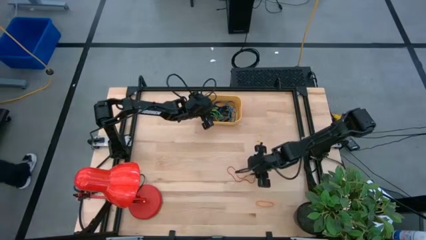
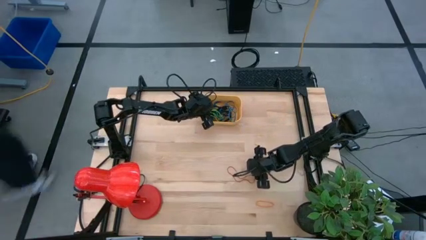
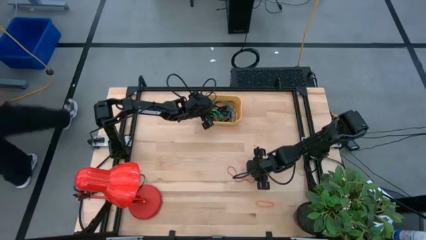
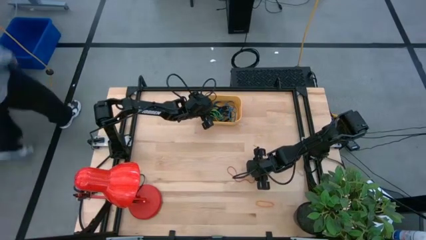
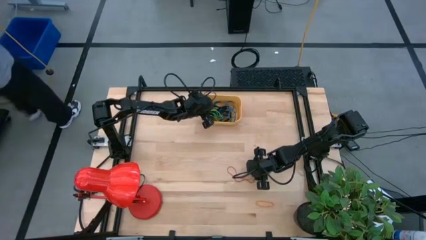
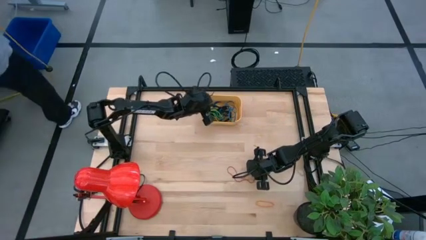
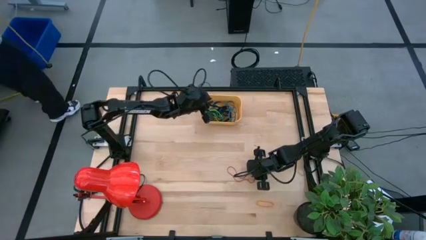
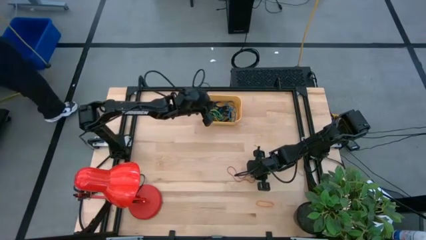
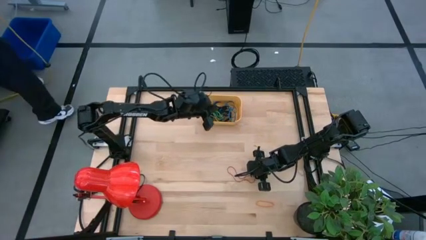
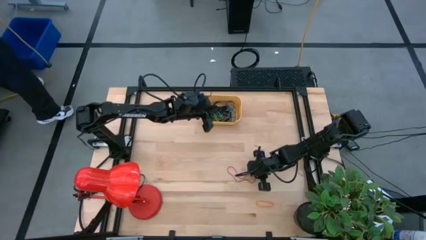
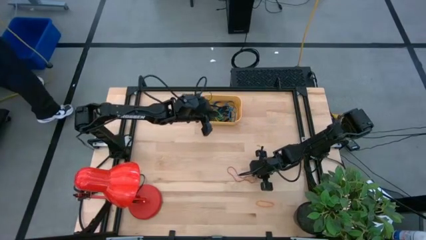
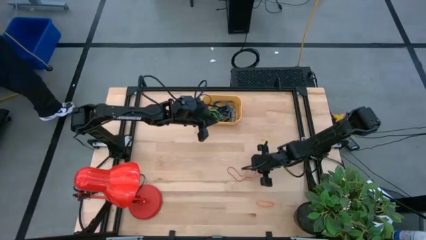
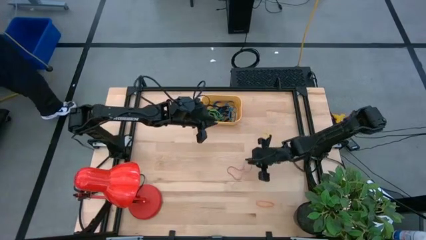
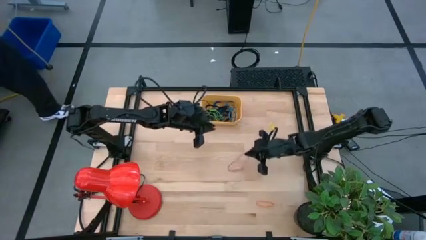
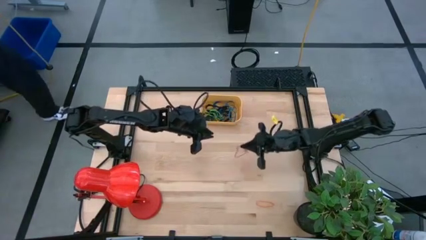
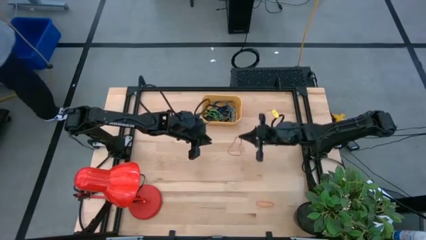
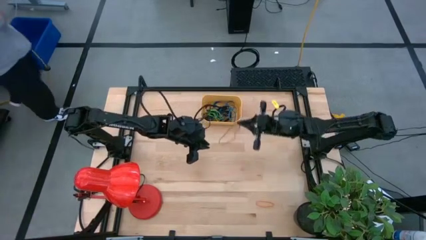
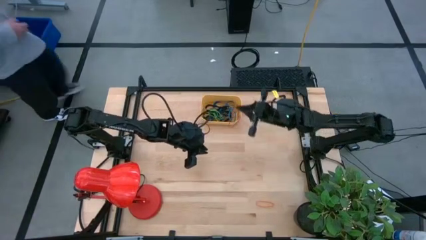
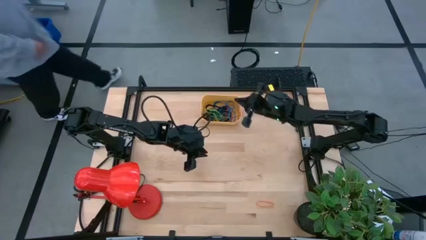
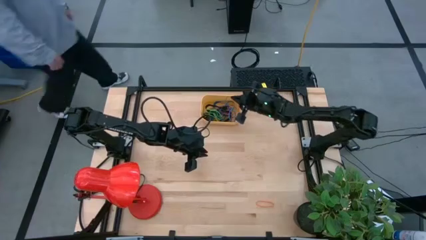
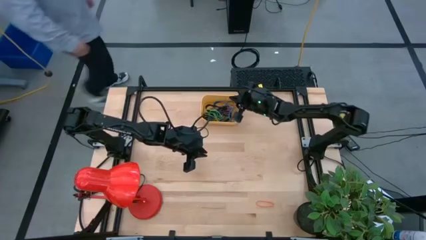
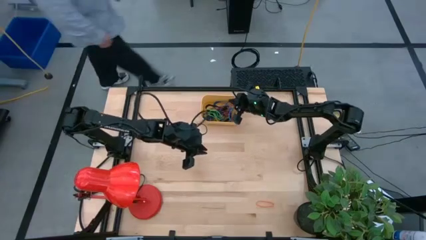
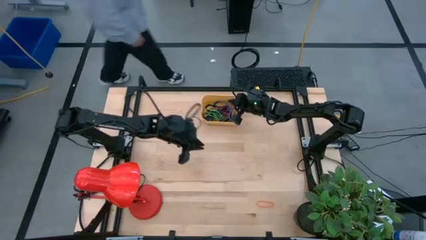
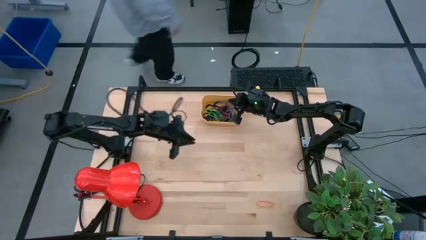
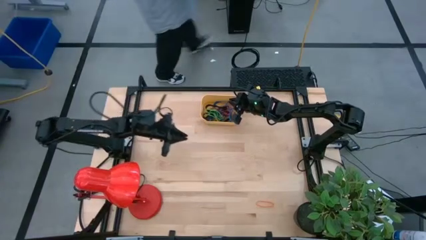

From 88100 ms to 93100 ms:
Task: Pick and place rubber bands into bin
Put the red rubber band into the yellow bin

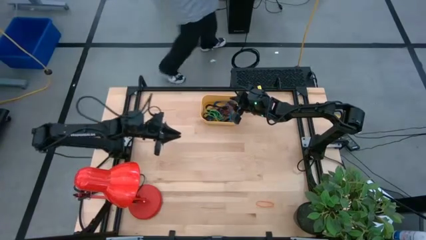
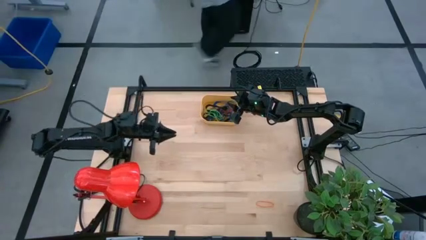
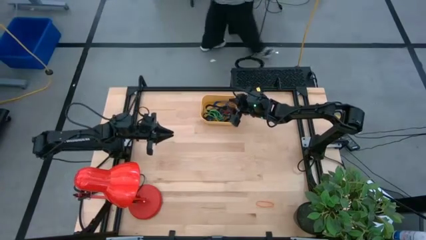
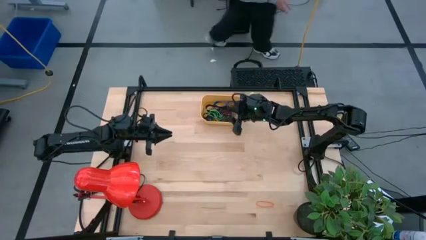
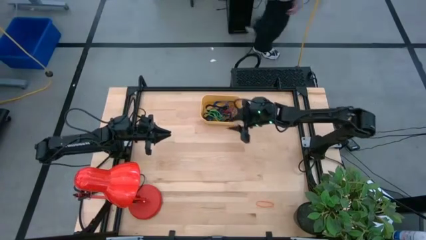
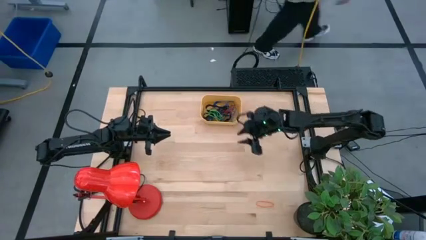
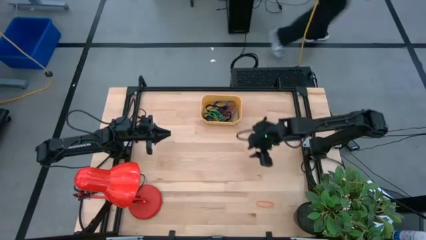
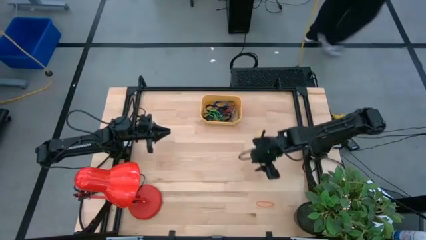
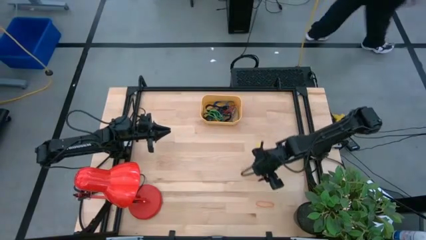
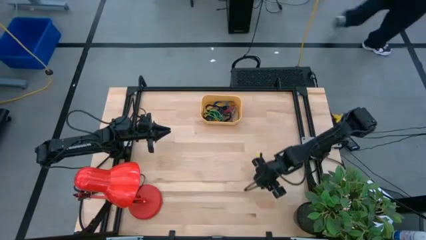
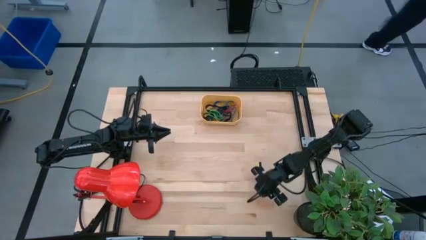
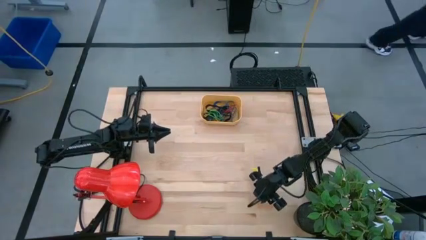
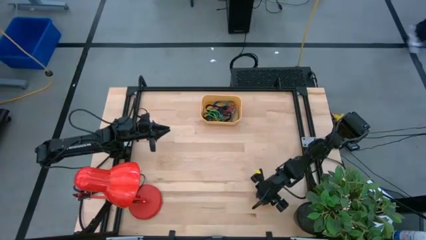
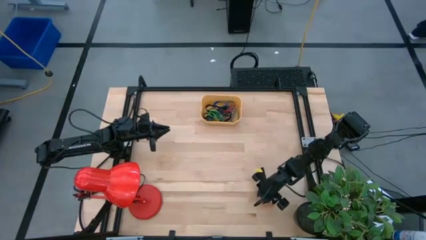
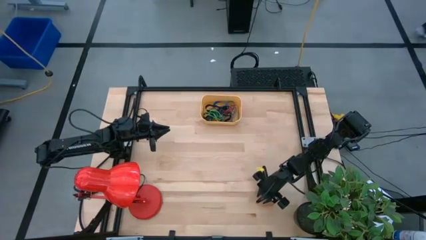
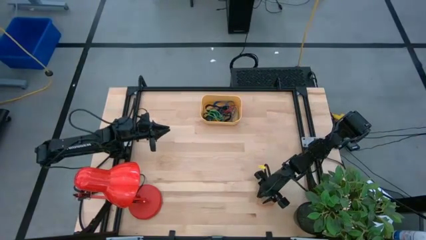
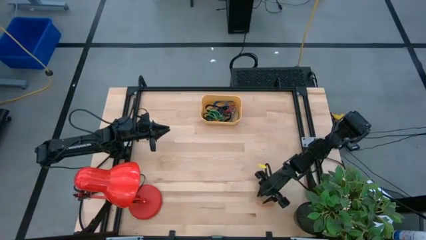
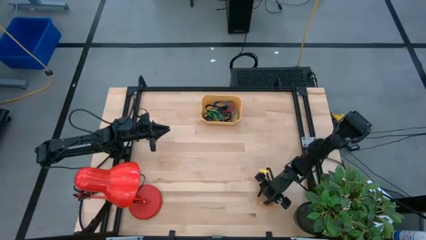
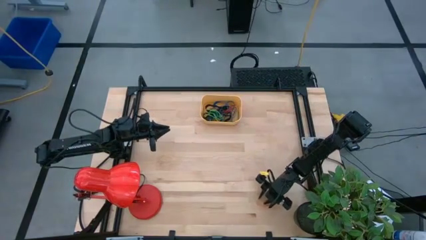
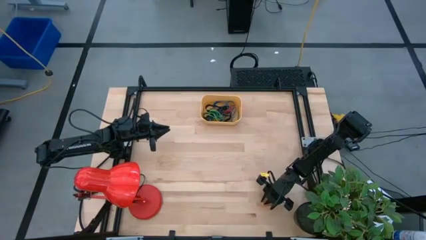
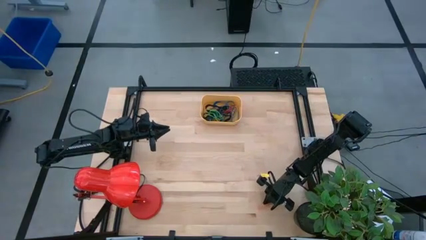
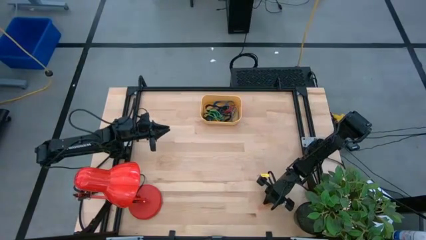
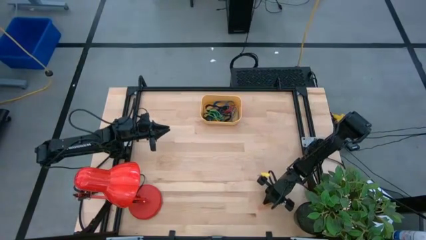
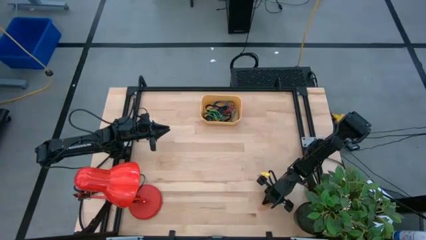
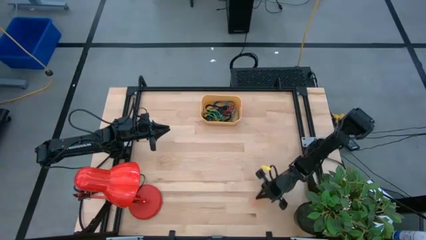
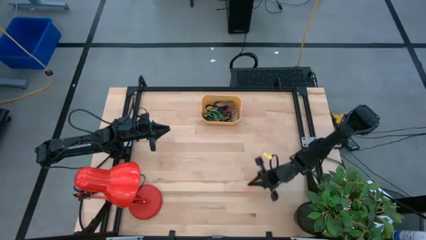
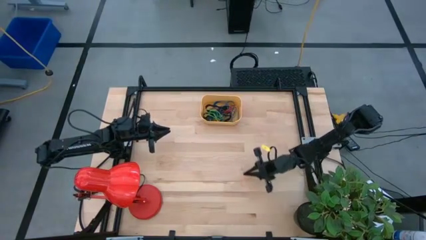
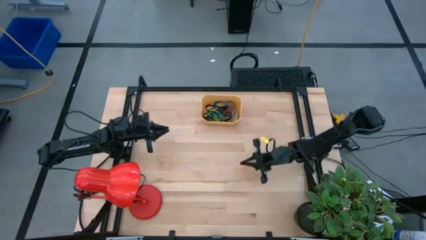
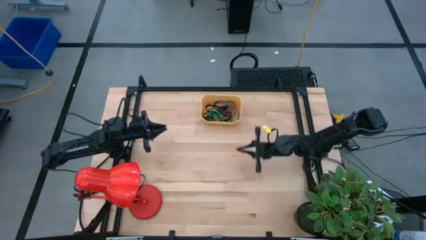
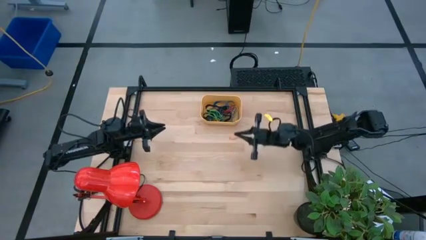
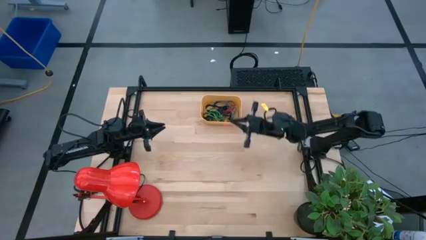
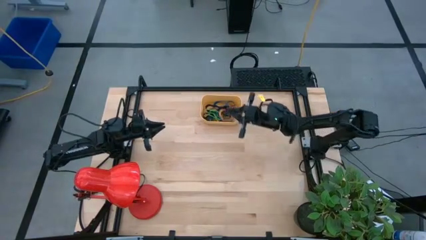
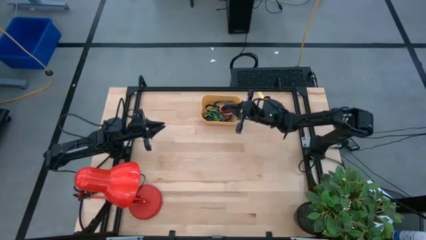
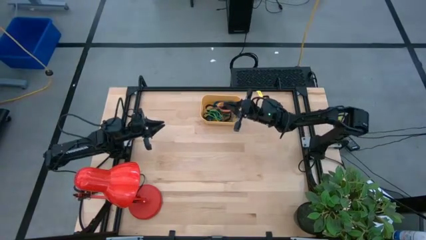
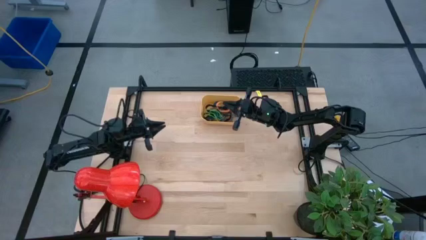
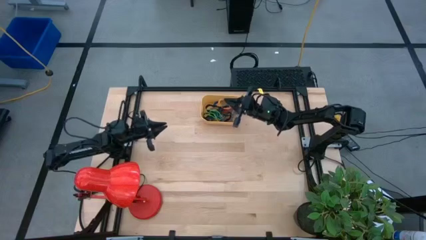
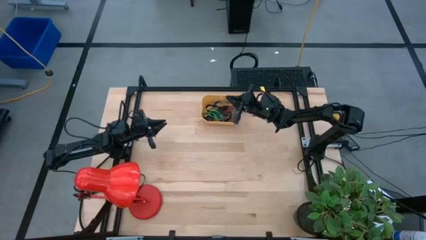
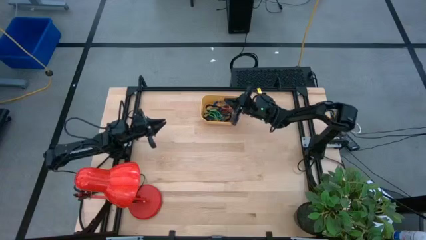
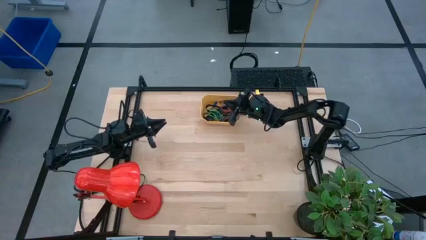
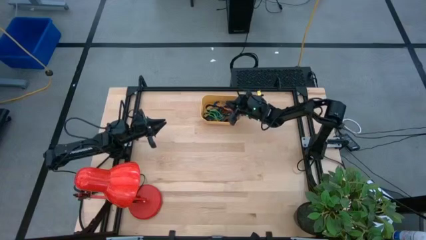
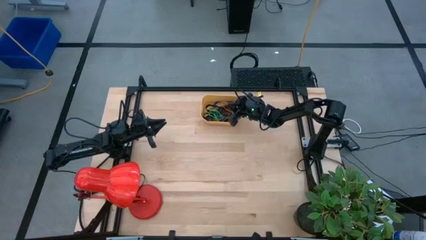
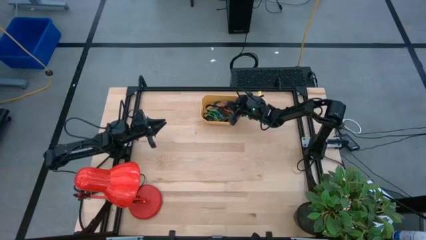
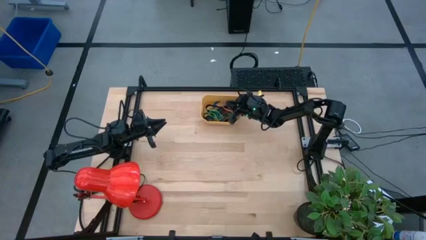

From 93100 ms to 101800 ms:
Put the orange rubber band into the yellow bin

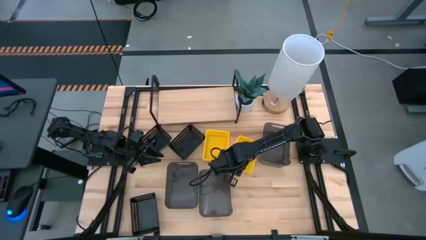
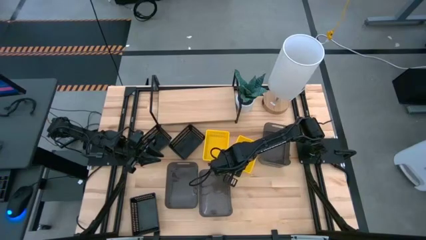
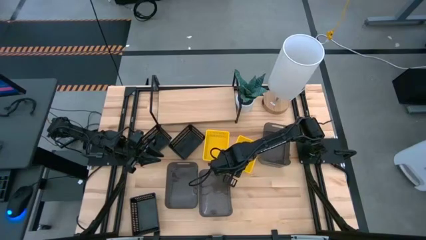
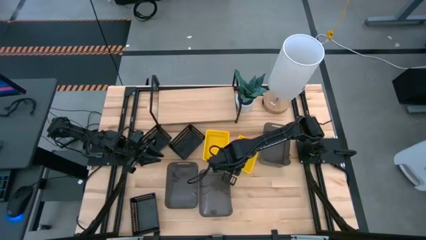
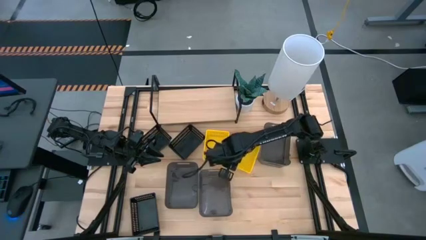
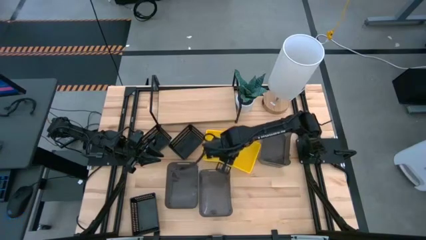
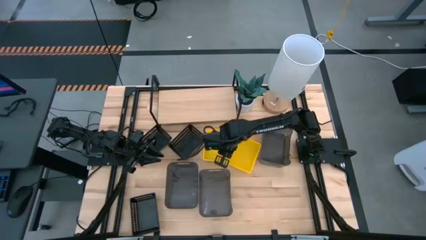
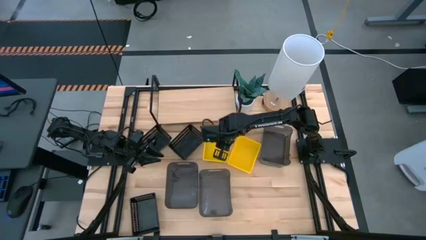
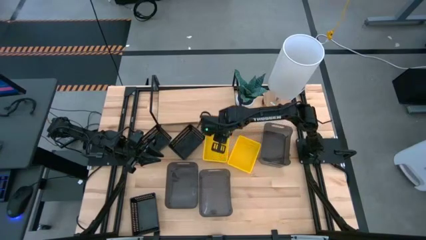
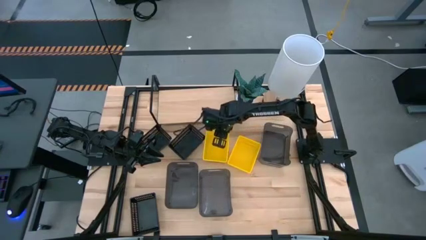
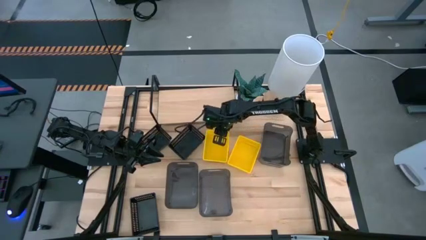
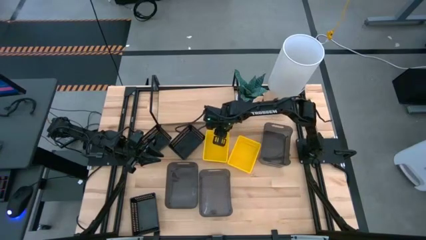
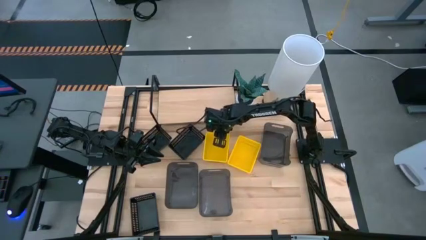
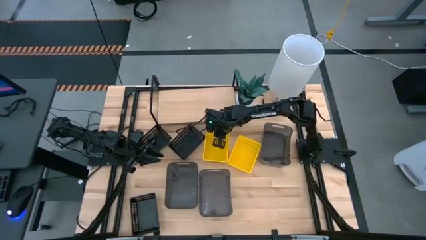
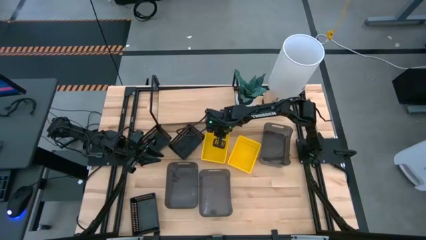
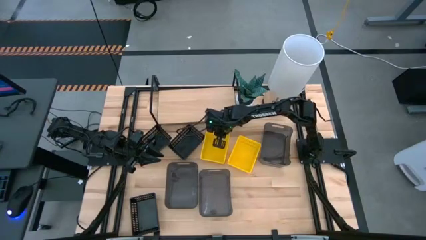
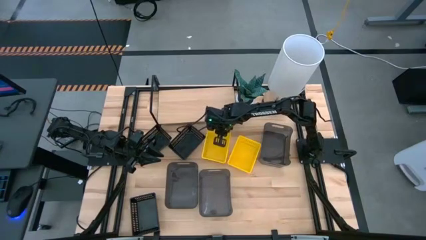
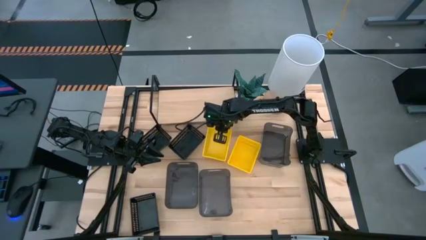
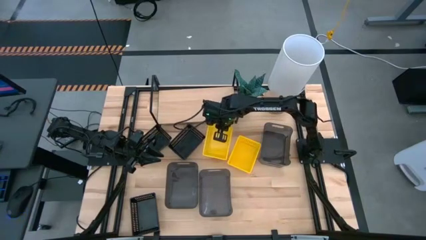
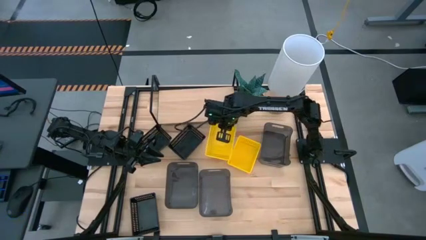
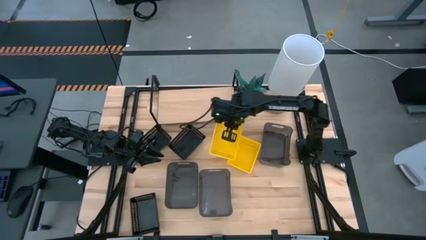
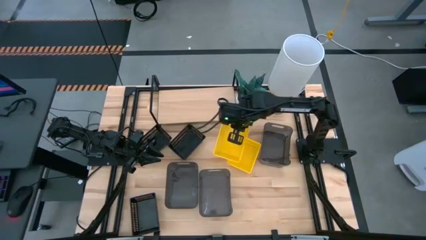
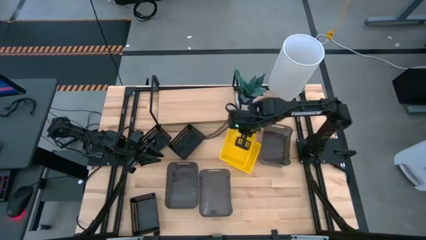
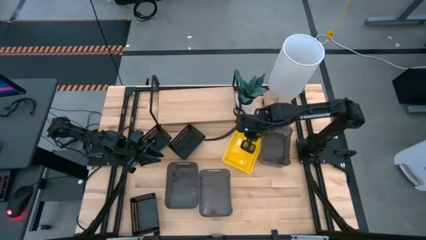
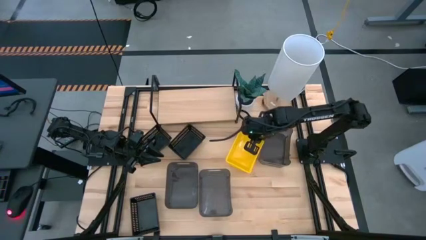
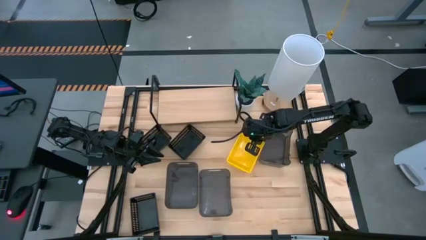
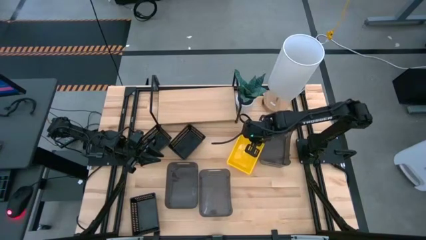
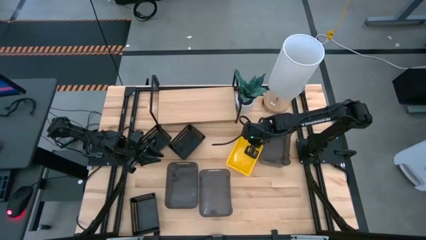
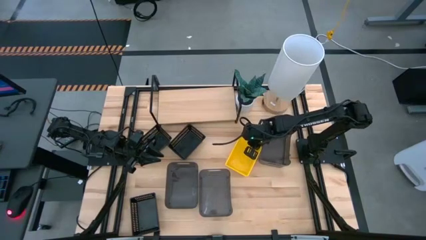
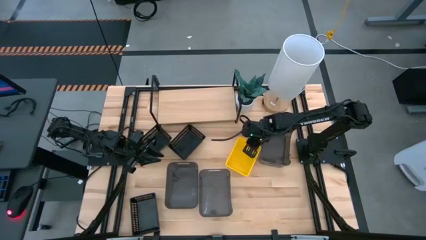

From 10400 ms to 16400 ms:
Task: Stack baskets on shelf by color
Stack the left yellow bin on the right yellow bin
